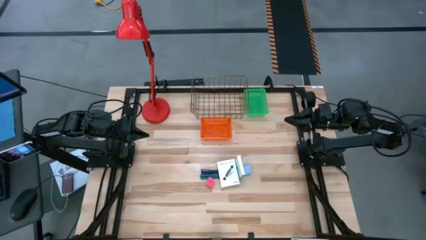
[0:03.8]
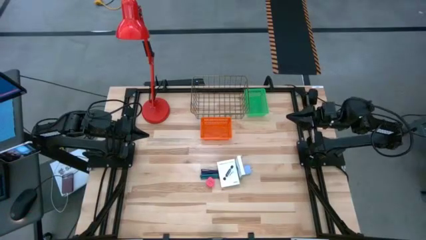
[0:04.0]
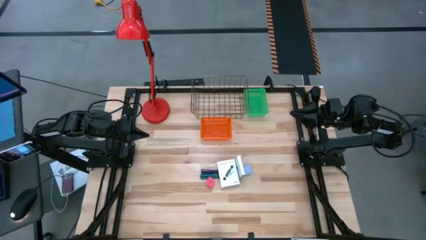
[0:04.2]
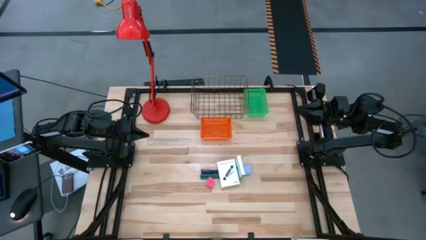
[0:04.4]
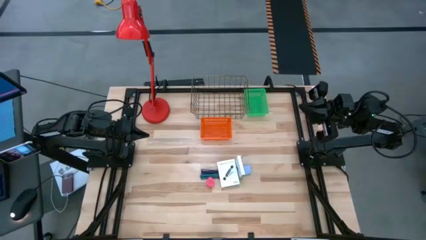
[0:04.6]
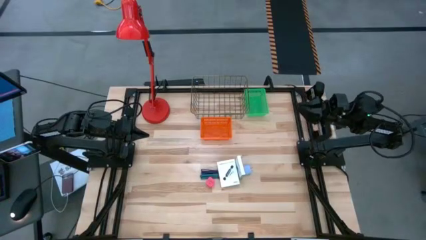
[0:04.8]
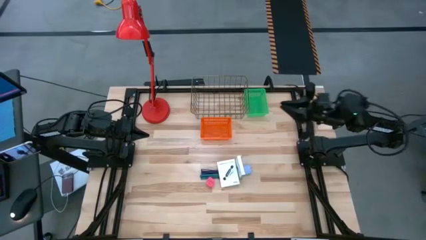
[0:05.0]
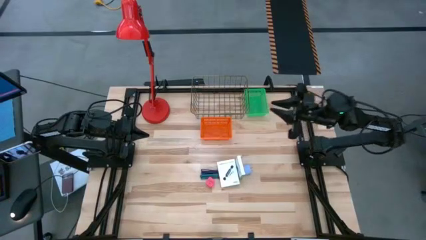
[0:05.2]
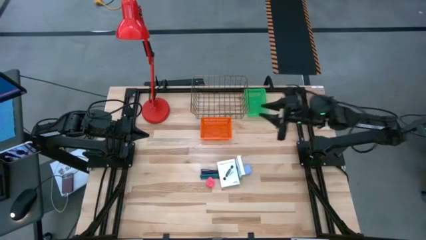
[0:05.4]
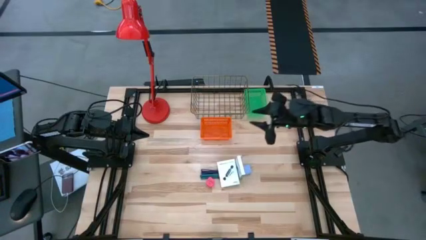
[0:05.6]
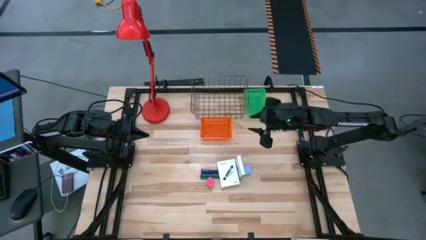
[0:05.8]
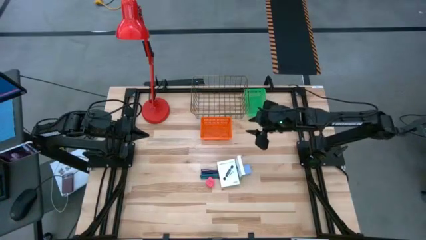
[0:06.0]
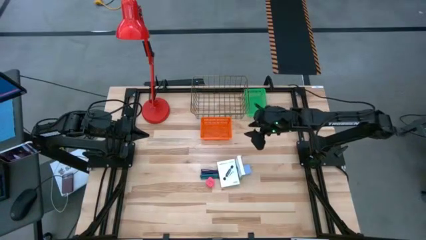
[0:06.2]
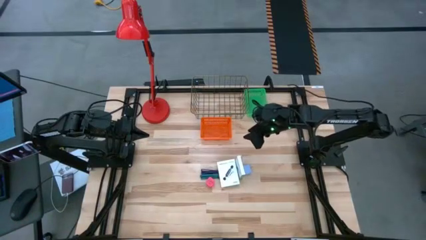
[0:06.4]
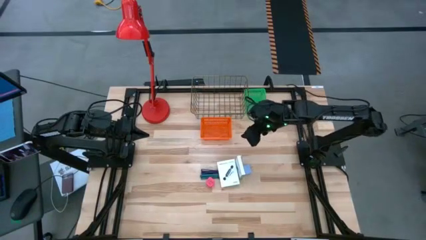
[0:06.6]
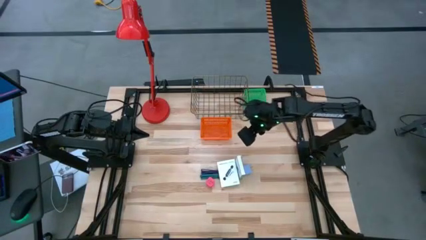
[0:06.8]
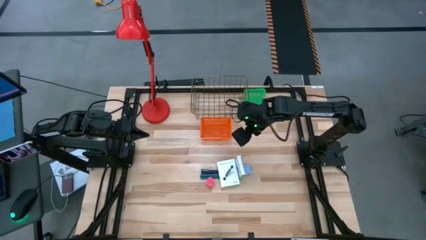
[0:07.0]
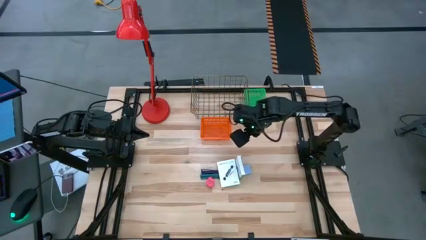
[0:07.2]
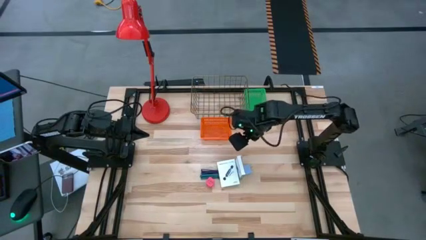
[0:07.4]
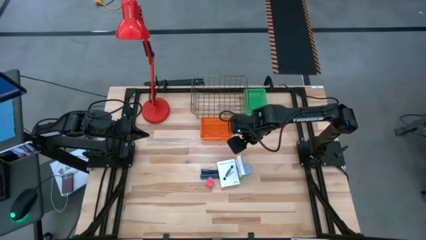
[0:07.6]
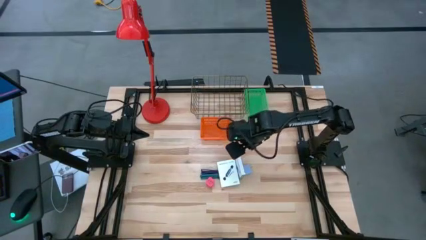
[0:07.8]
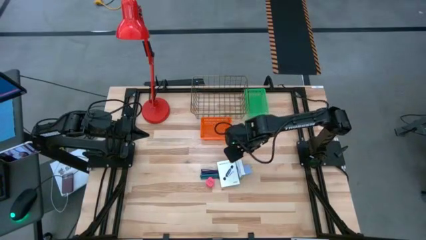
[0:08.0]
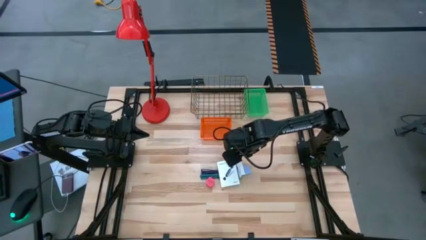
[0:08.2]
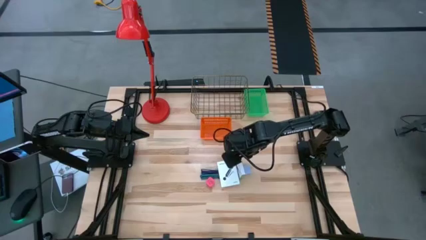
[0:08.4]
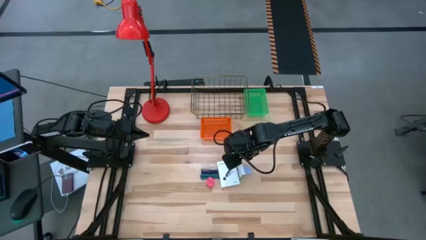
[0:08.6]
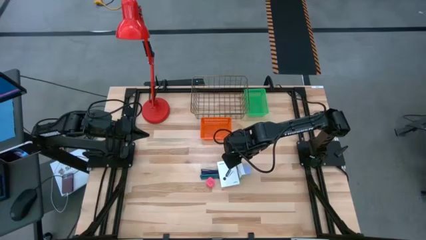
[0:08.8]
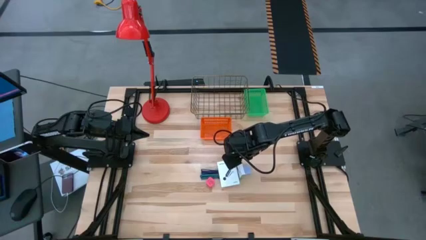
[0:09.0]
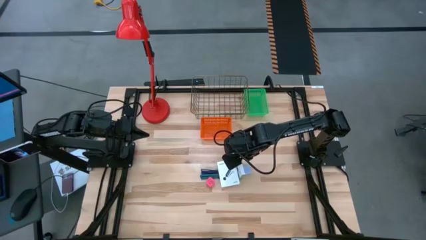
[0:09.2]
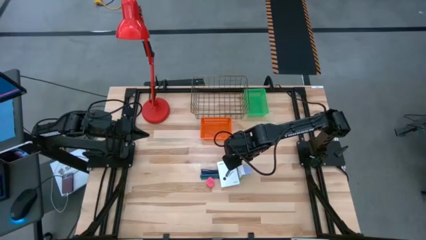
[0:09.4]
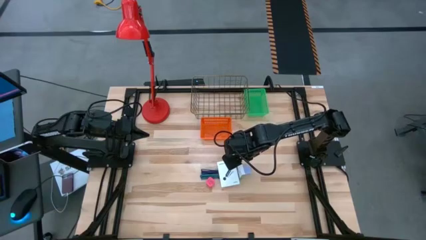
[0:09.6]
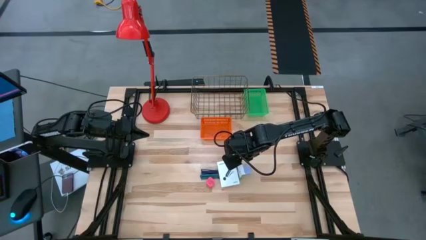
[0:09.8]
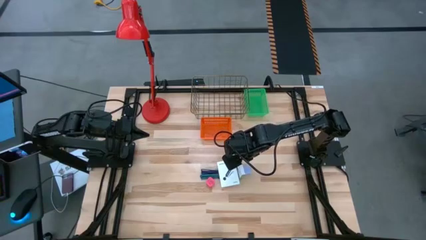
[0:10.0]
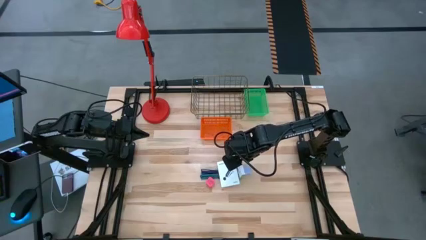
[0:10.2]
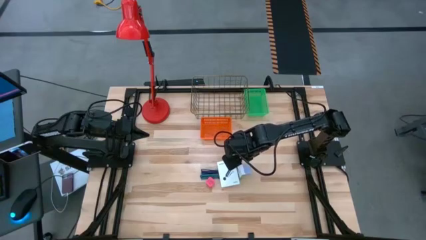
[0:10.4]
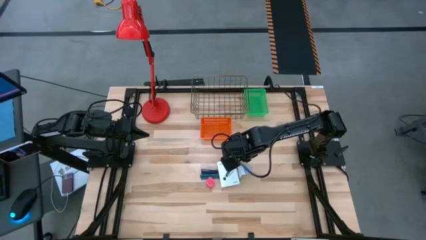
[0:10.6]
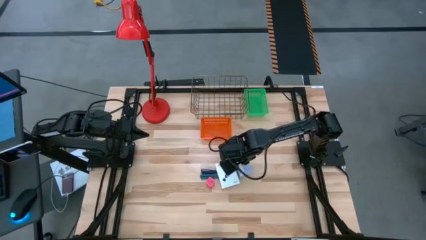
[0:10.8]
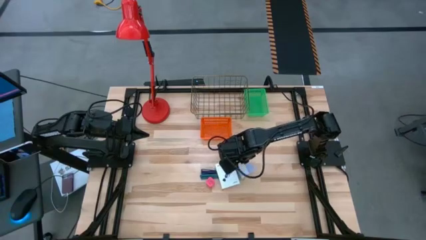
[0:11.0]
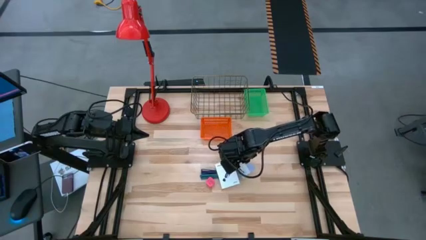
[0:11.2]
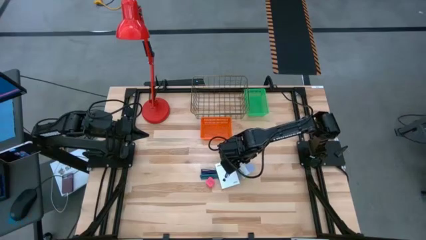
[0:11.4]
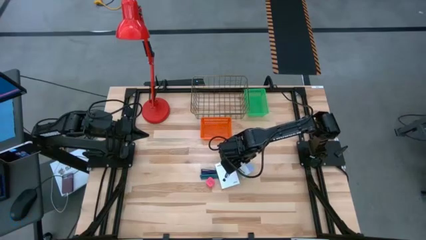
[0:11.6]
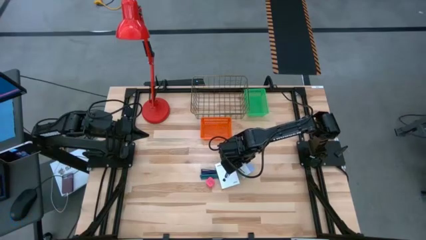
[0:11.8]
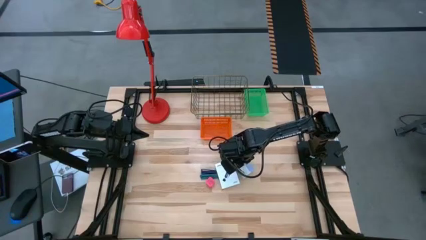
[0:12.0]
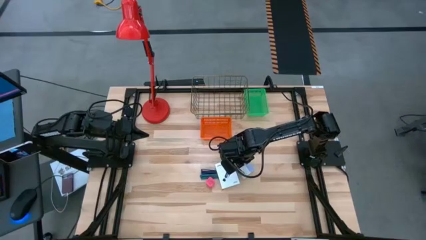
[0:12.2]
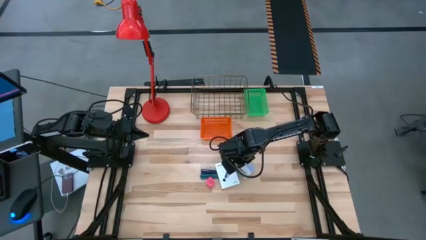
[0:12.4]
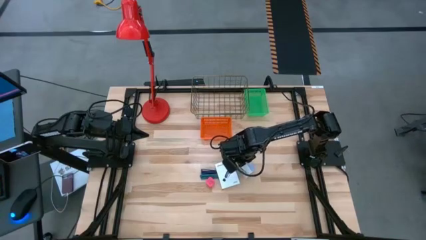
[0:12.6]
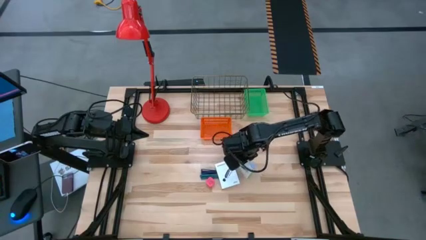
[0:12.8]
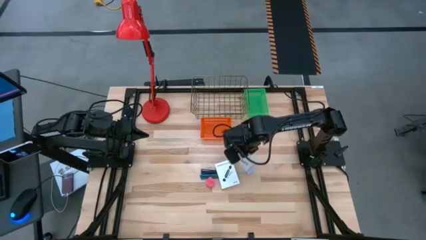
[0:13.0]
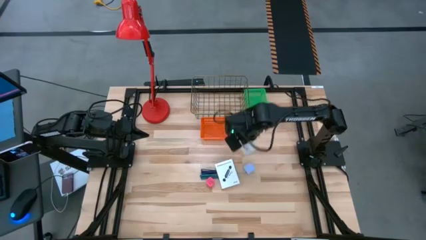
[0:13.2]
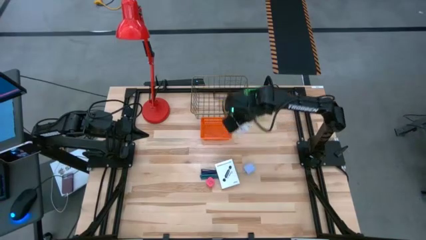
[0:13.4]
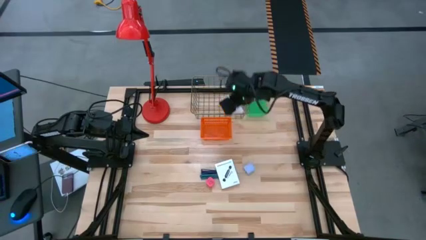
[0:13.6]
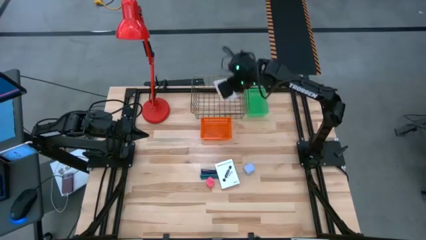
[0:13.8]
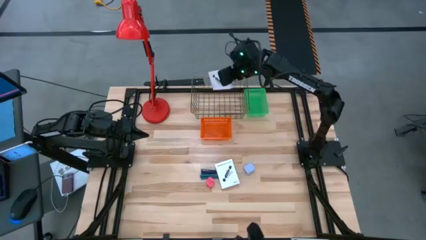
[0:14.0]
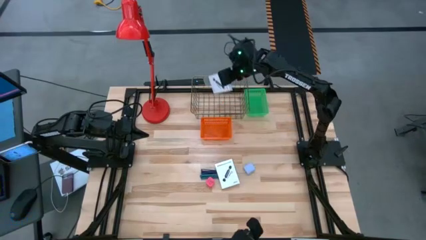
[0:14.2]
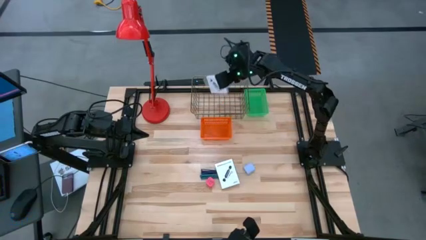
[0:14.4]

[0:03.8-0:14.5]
Task: Pick and place items into bin
Put the right card reader box into the gold wire basket
